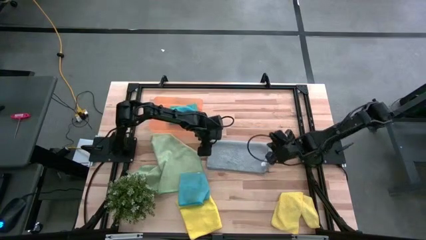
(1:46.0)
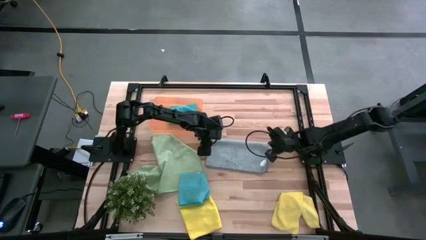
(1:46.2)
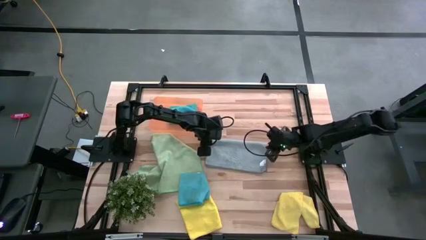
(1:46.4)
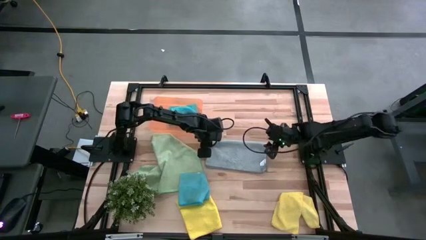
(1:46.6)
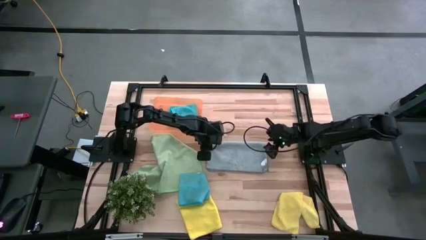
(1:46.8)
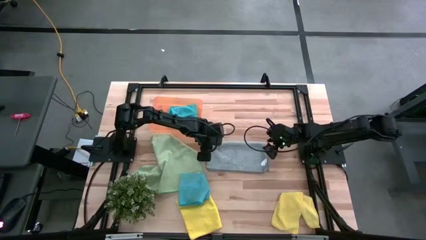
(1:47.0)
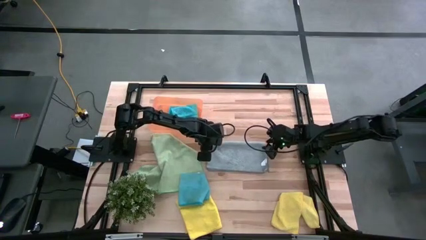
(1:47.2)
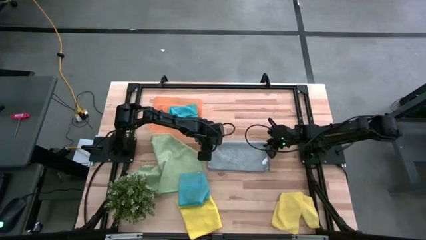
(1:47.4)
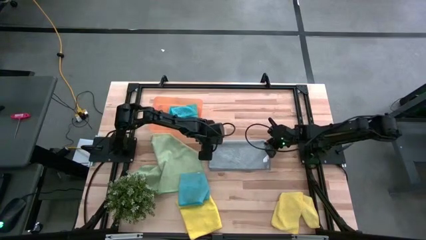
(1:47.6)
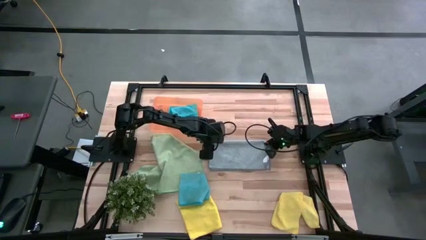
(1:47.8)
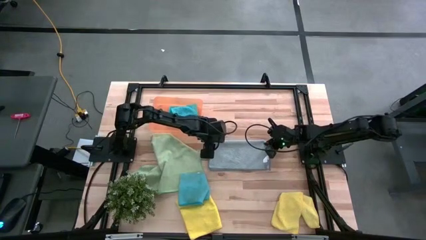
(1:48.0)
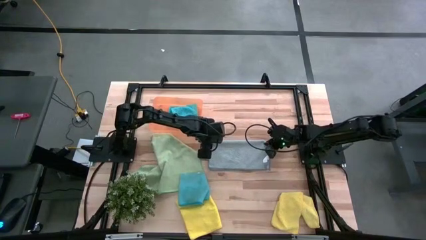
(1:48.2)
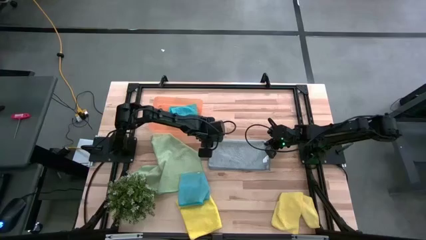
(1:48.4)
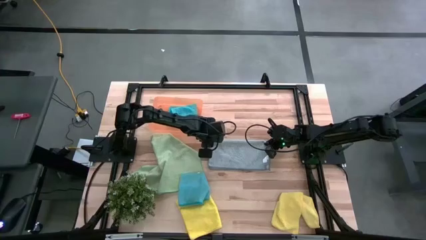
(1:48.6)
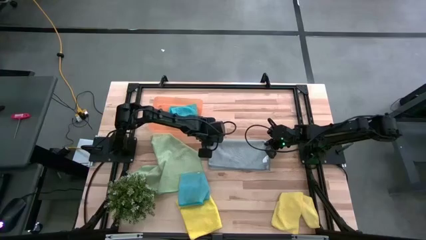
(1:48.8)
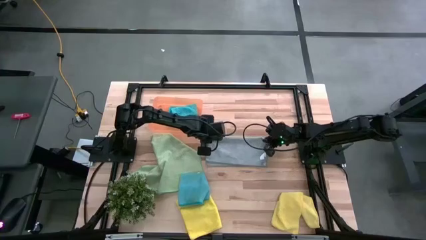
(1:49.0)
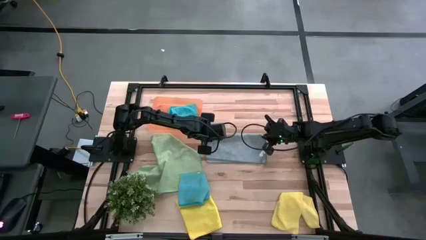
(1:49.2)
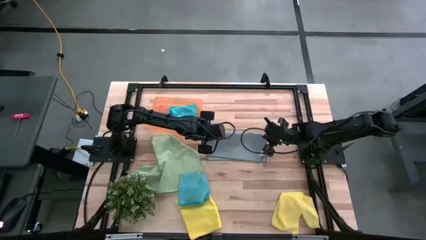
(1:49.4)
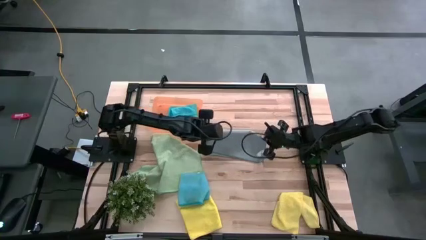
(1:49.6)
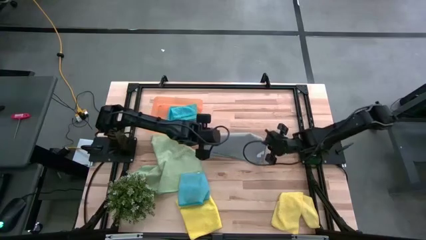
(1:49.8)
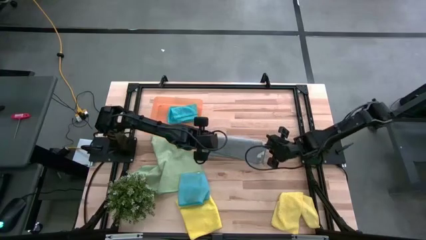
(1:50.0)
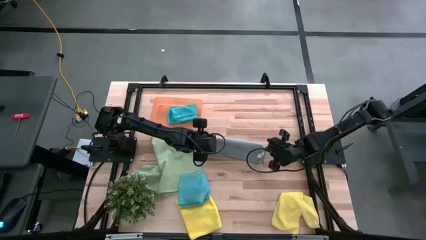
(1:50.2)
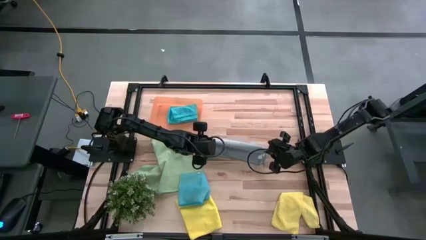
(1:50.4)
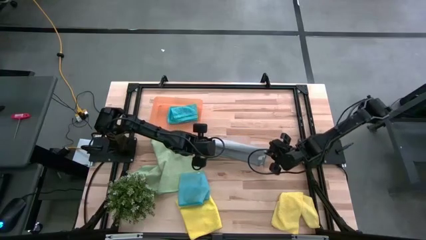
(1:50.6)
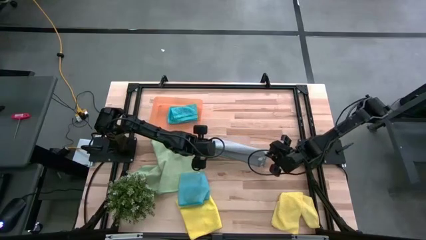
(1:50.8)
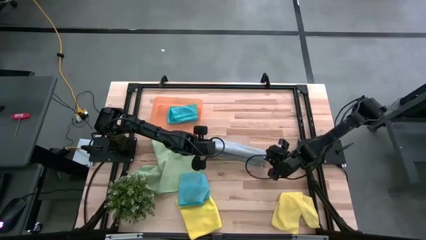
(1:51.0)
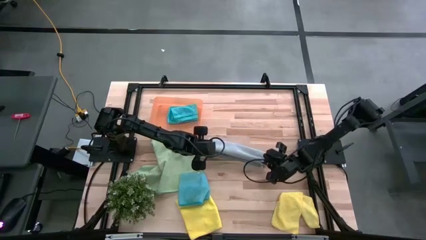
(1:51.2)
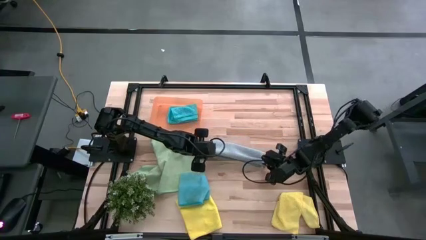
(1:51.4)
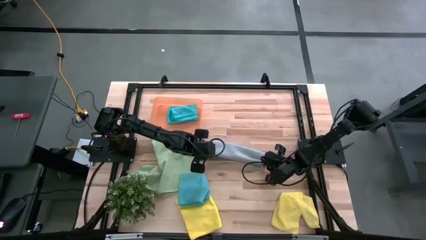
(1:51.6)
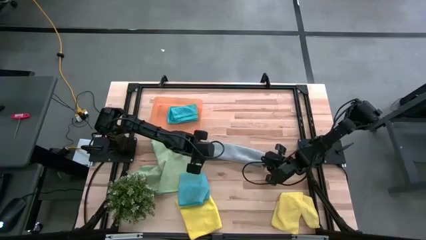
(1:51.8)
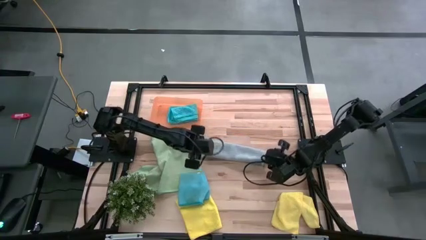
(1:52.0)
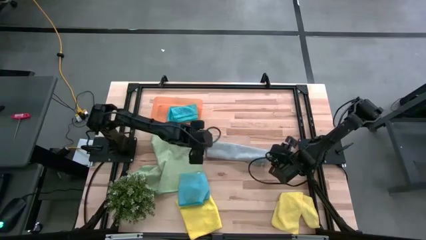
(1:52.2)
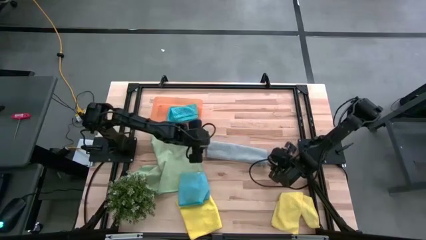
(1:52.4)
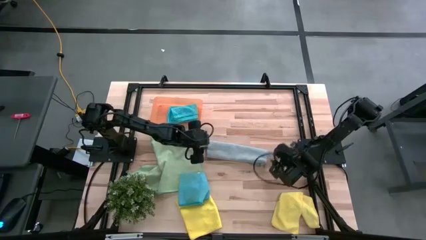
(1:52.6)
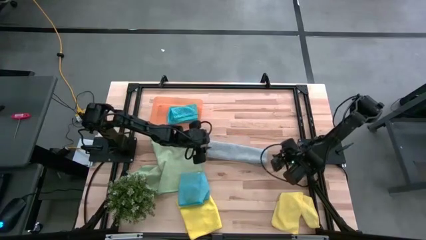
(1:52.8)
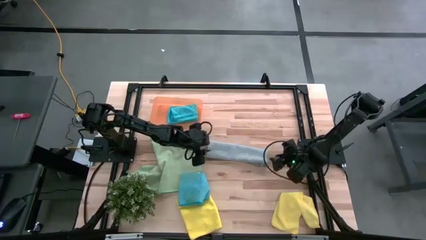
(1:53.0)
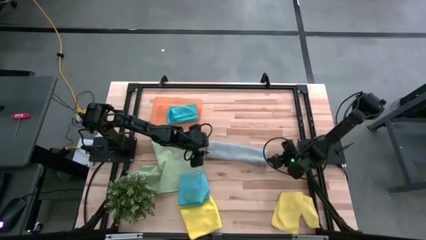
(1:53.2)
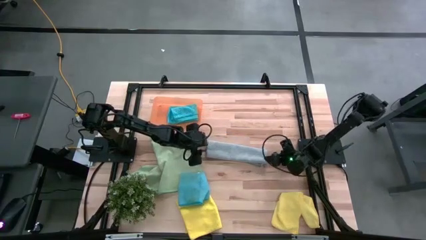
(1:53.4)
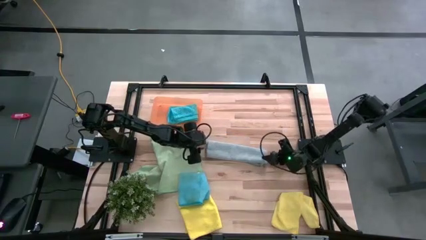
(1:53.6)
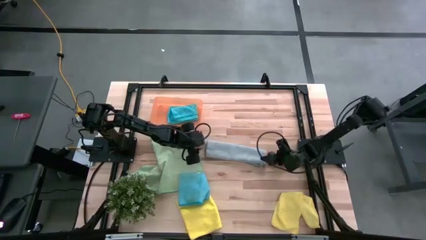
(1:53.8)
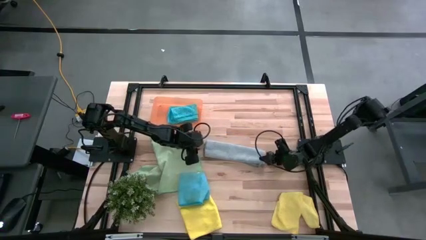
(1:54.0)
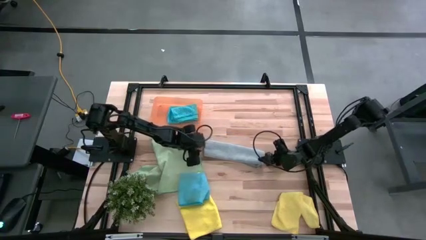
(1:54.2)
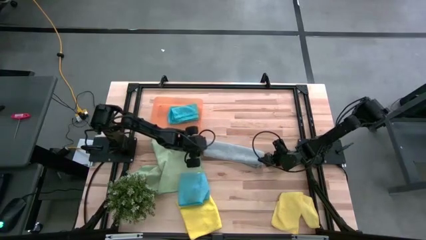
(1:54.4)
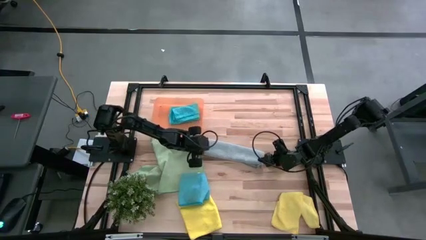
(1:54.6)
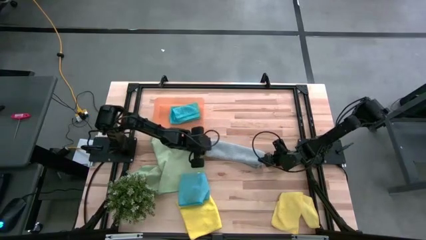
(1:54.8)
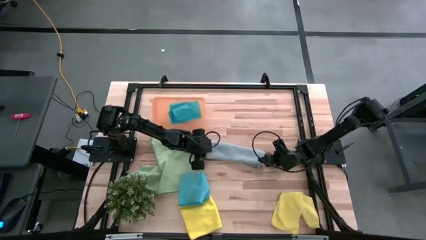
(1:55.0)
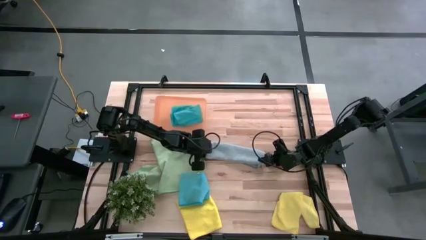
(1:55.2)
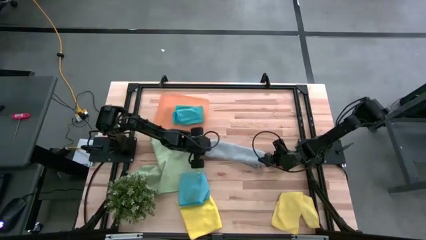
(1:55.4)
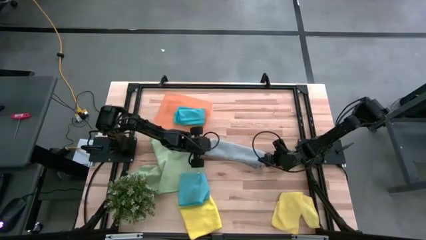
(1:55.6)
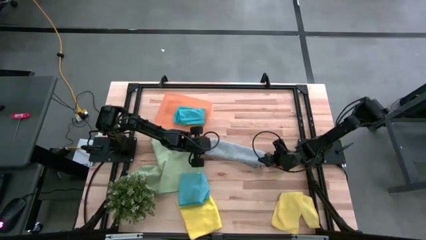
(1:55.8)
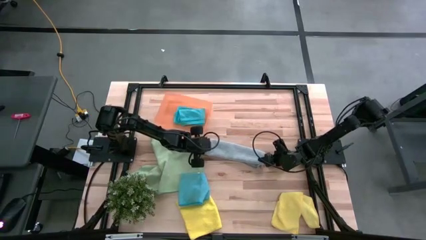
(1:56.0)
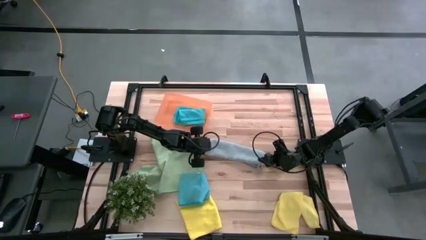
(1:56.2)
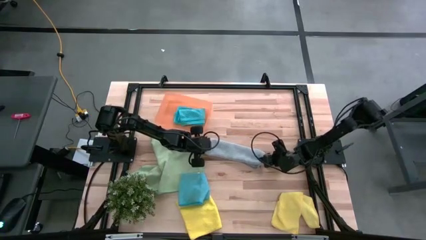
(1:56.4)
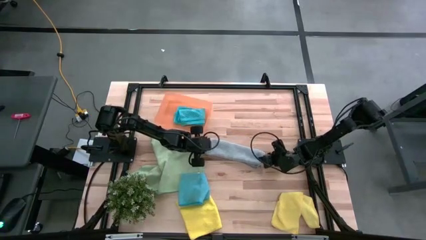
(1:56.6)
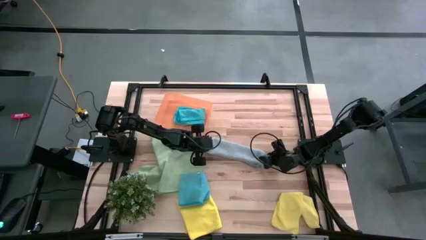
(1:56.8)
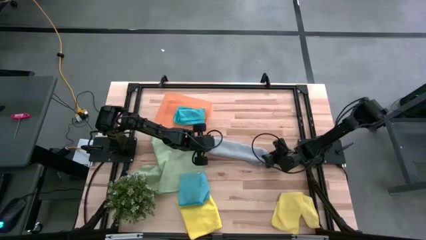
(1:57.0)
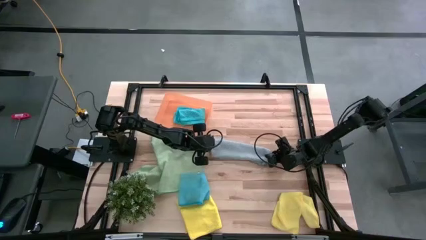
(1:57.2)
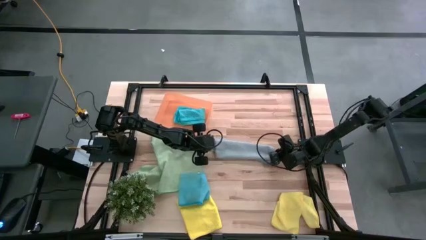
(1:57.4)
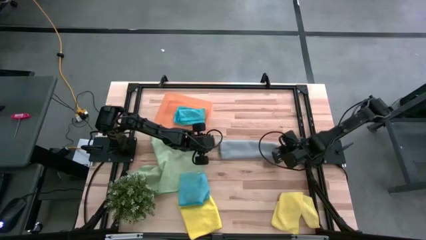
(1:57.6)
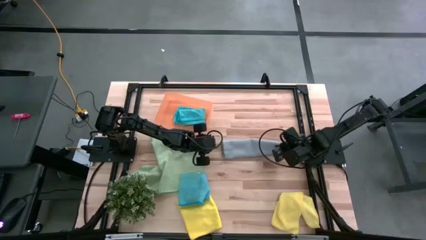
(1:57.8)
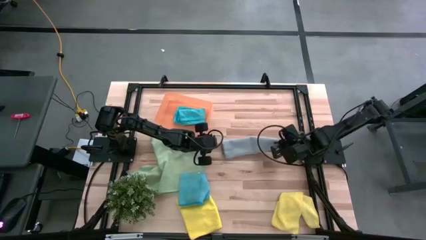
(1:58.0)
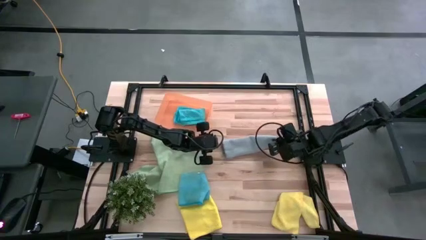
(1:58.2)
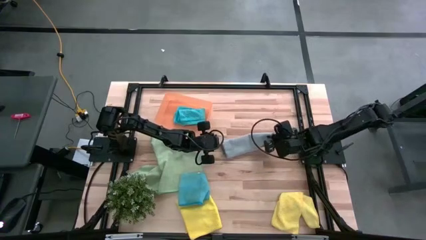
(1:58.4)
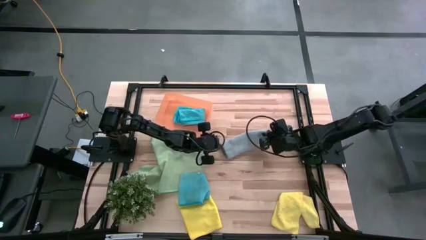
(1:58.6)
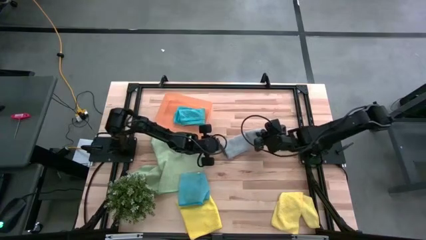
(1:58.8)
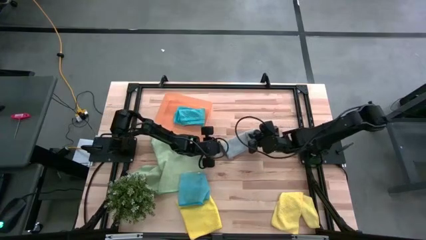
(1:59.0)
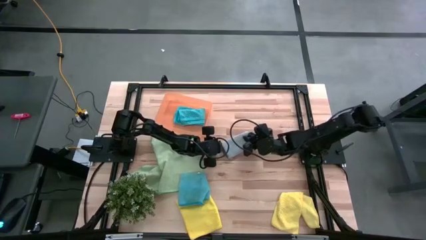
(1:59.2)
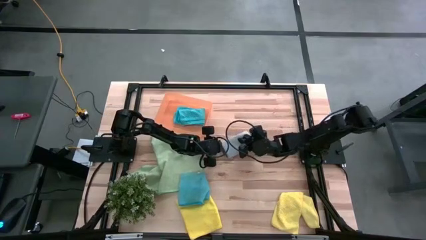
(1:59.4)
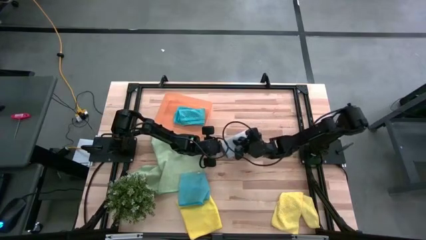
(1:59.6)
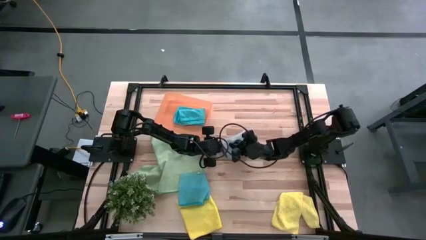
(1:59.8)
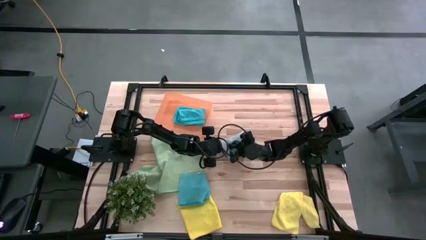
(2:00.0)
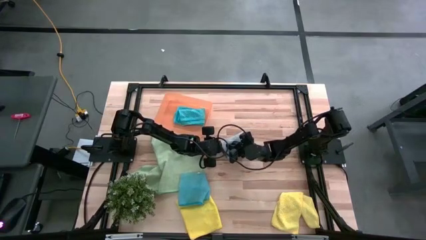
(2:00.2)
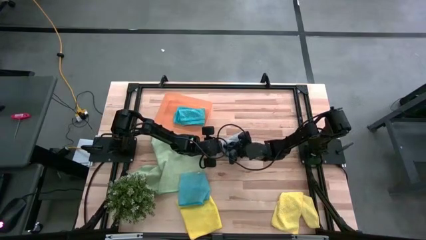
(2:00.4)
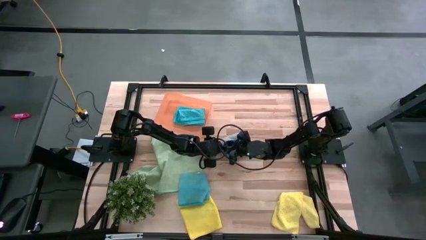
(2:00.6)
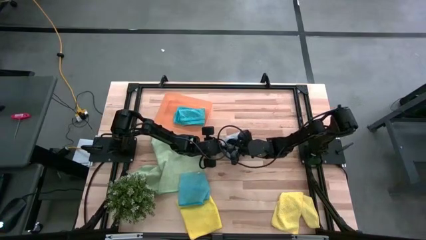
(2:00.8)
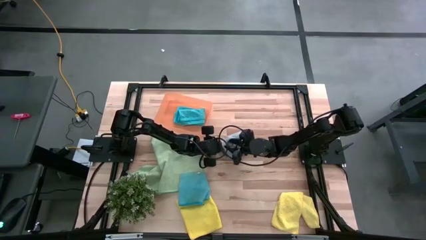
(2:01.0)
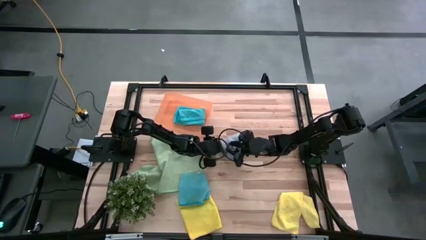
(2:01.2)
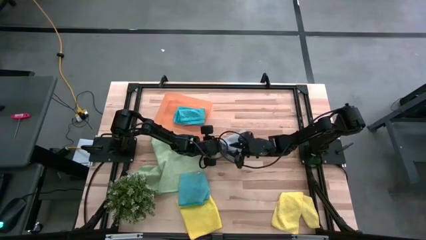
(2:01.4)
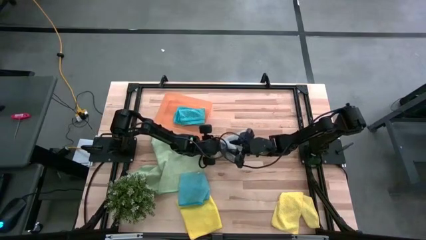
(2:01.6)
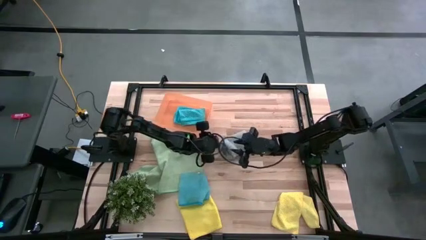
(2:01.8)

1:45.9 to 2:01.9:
Task: Fold microfiber towels
Fold the gray microfiber cloth
